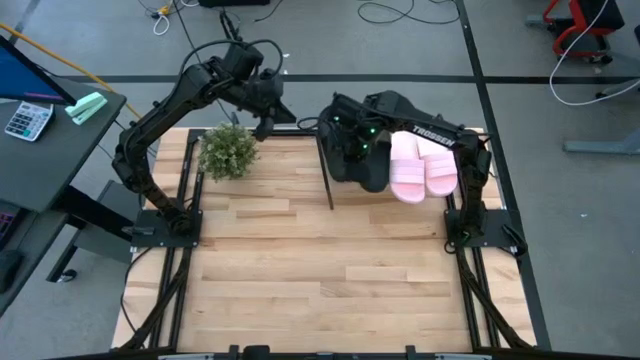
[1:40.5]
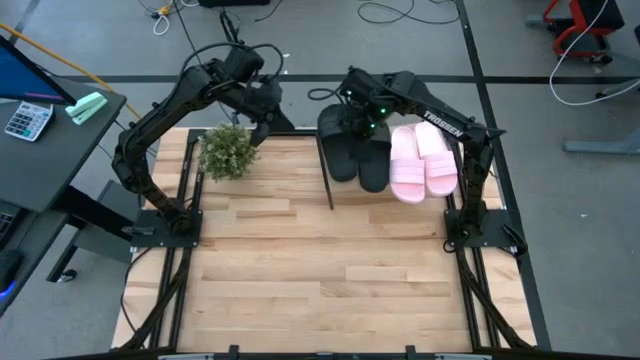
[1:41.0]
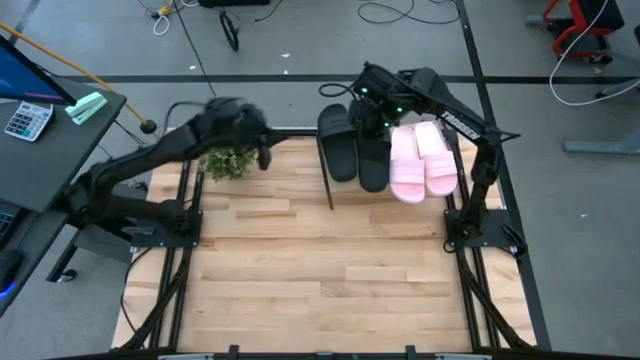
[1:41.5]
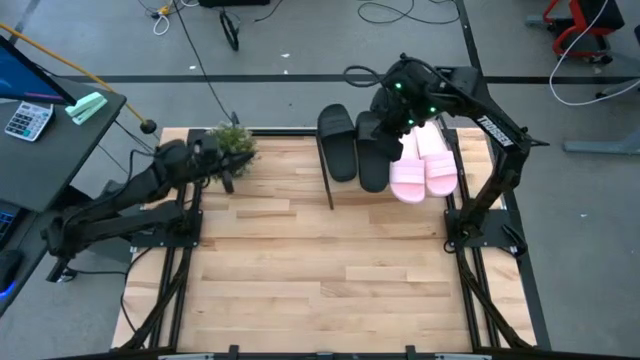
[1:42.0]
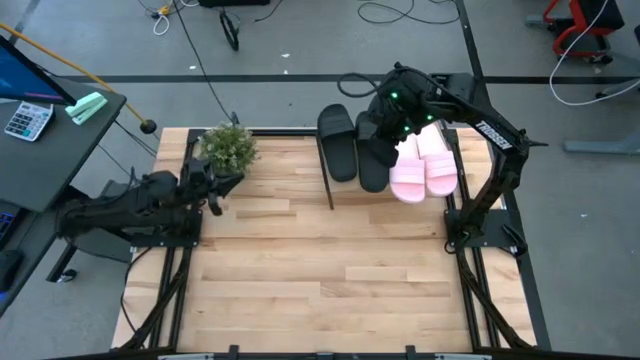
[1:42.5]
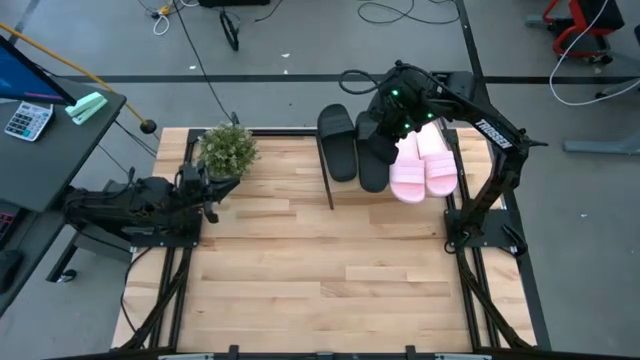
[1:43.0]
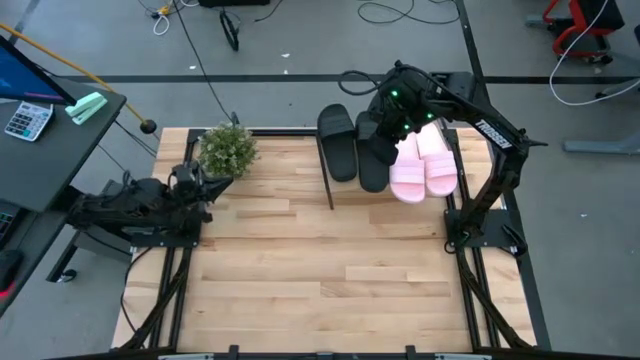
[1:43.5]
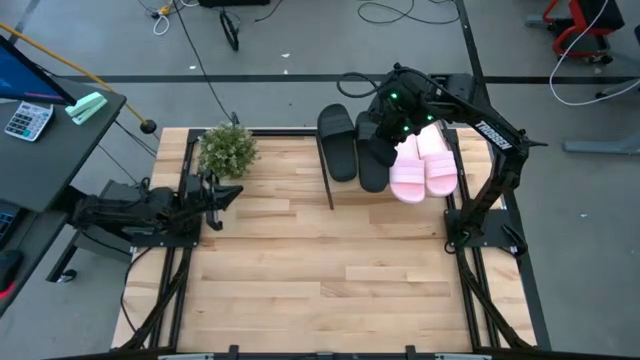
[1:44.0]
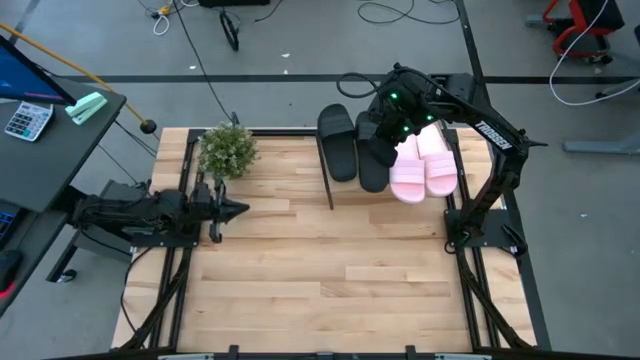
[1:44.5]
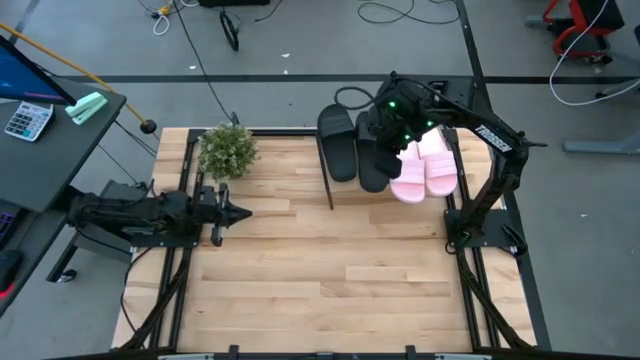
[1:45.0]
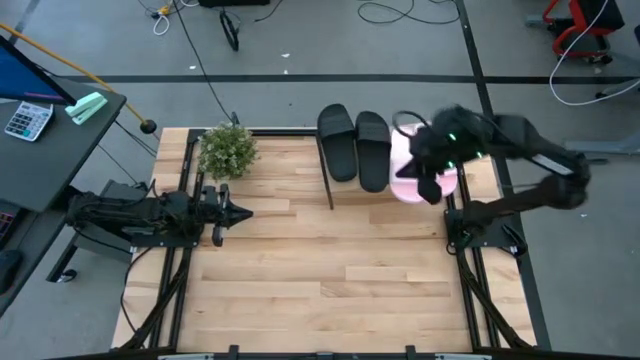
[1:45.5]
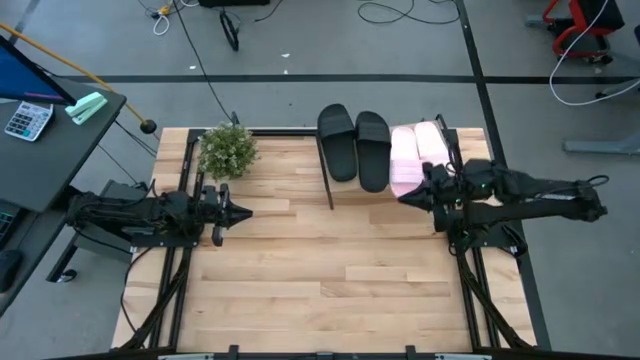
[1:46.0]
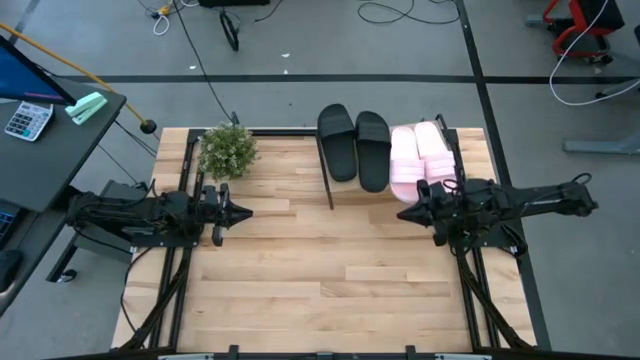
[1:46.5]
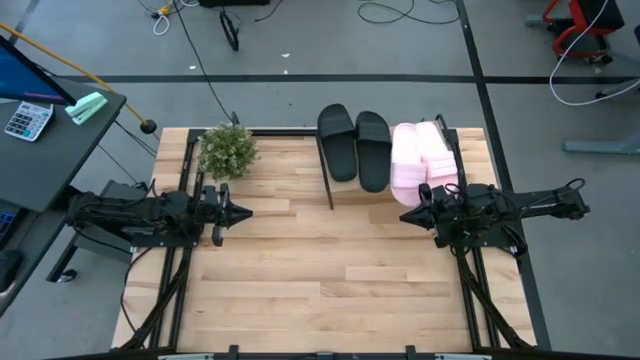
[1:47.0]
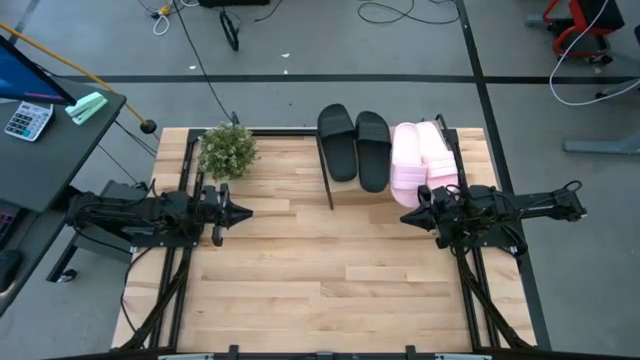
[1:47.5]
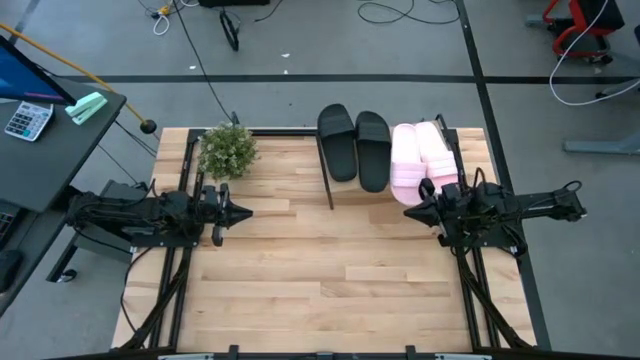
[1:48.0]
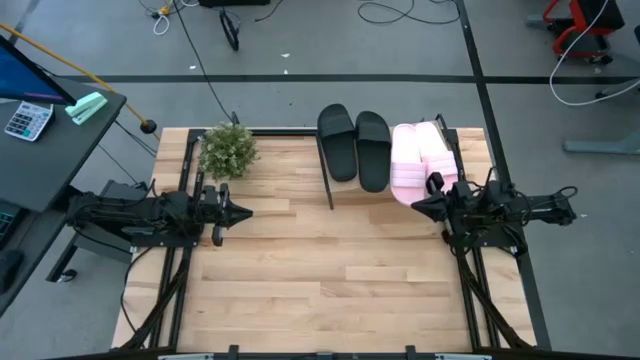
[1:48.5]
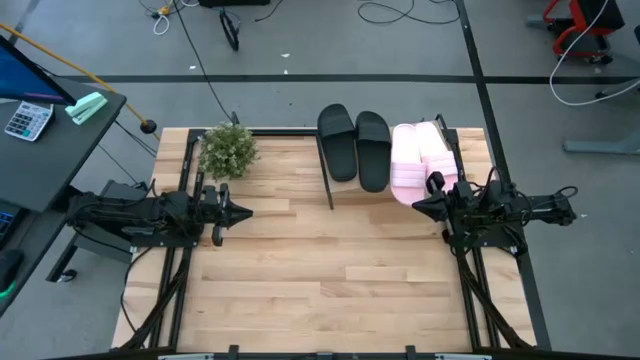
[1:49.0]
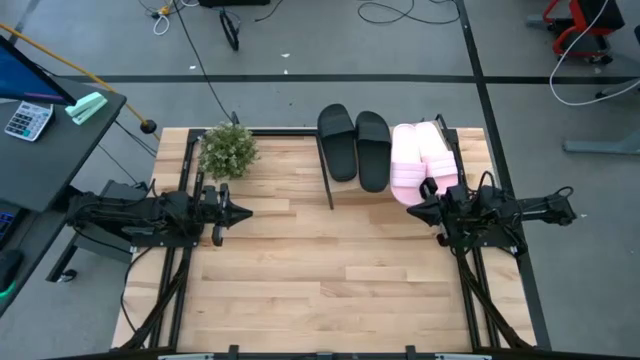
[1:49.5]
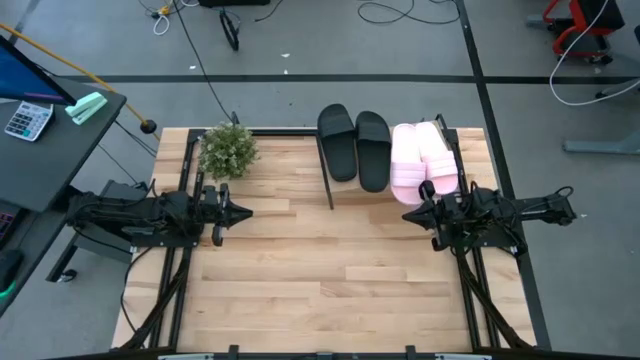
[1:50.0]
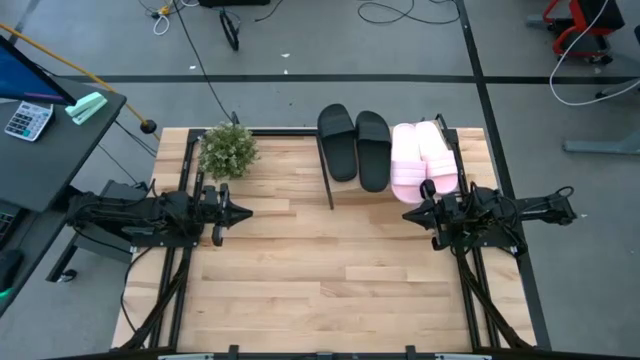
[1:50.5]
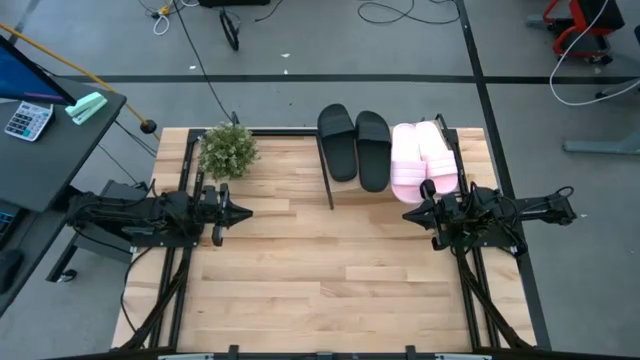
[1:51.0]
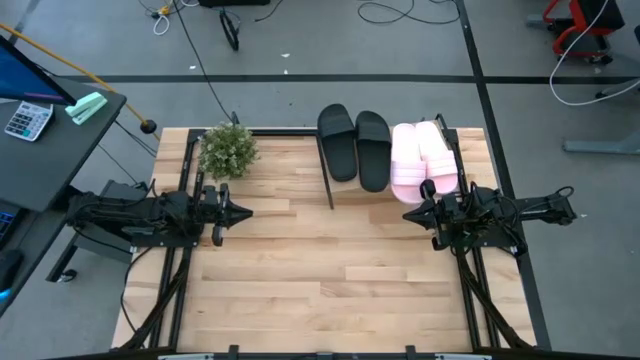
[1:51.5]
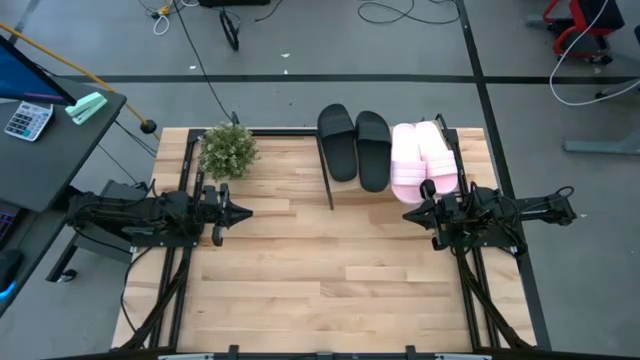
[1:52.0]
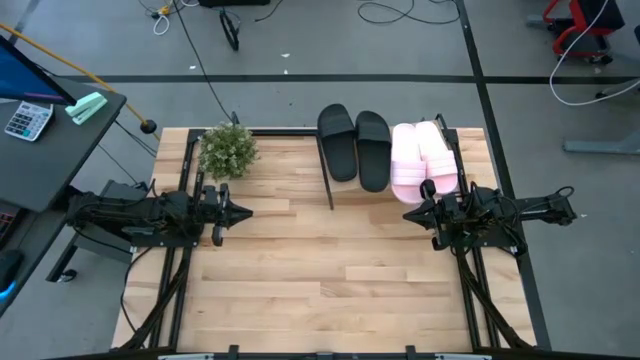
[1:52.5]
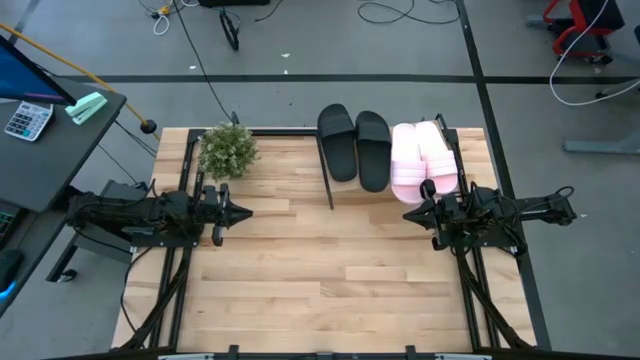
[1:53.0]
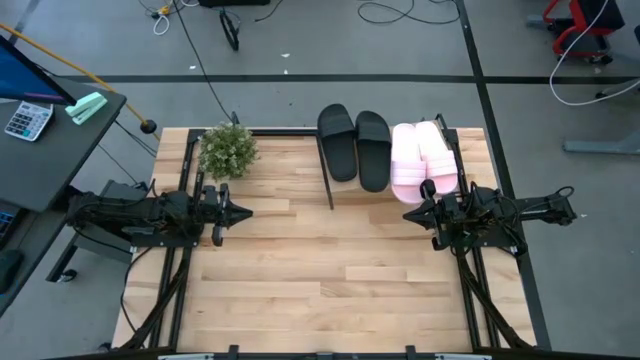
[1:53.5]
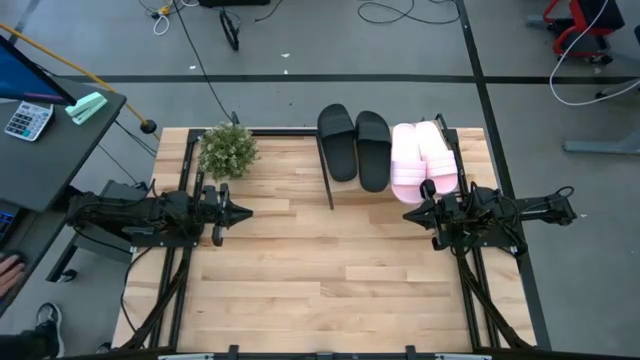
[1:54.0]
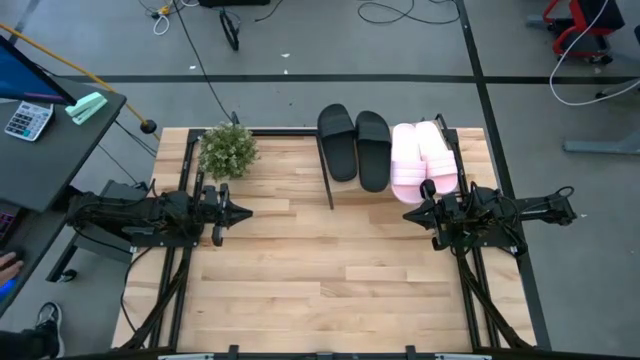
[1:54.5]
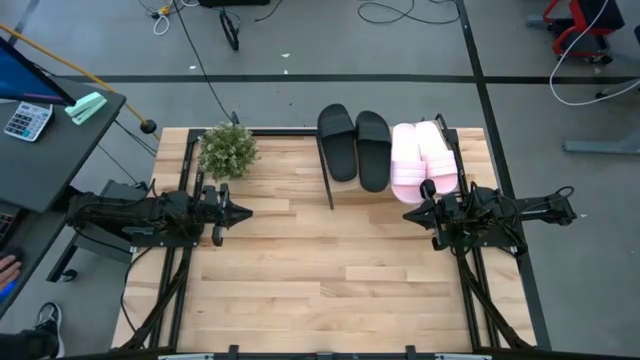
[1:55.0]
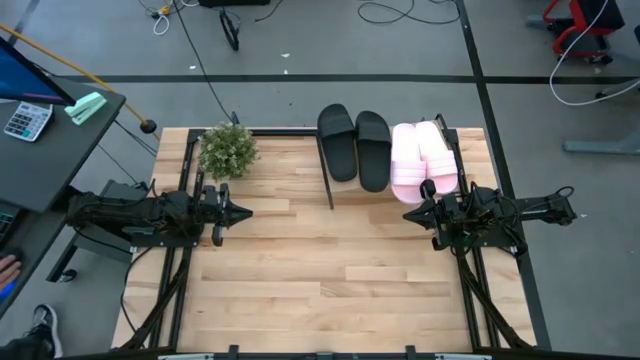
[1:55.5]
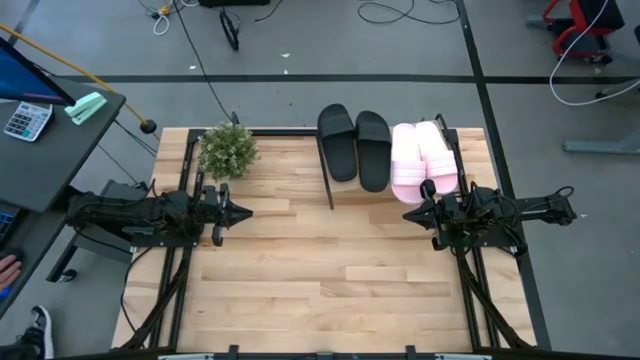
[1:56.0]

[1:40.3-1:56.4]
Task: Pick and place slides into the shelf
Return to Home Position
